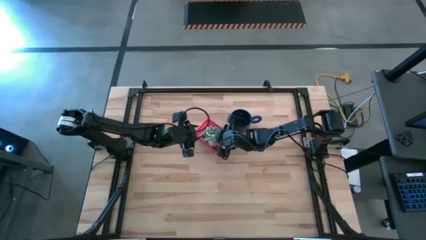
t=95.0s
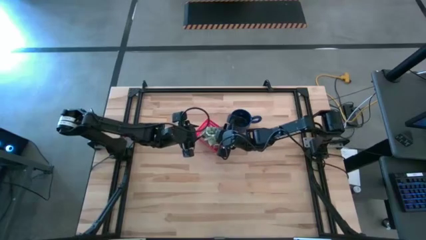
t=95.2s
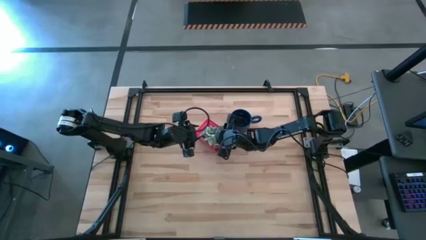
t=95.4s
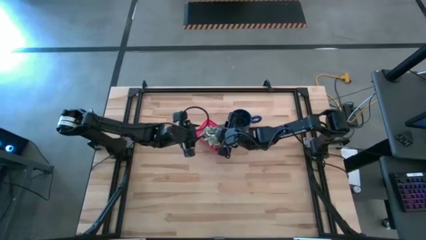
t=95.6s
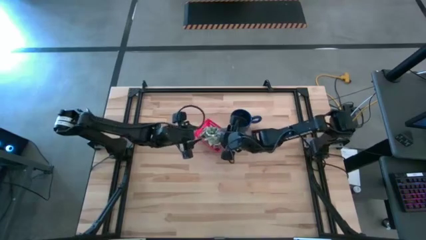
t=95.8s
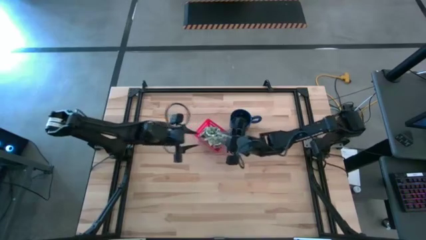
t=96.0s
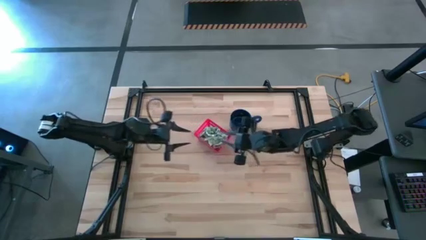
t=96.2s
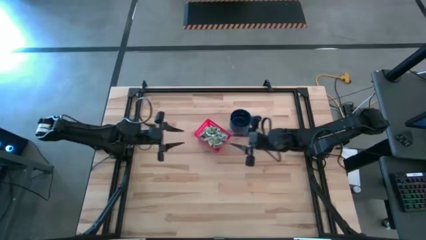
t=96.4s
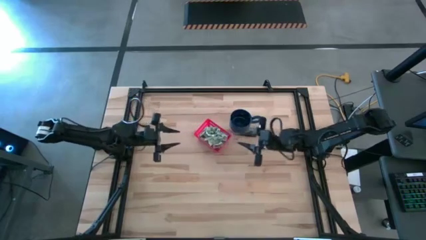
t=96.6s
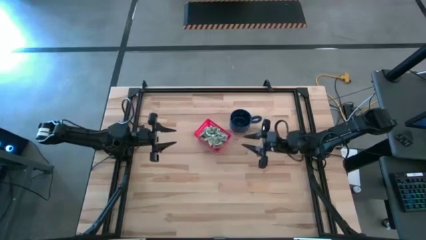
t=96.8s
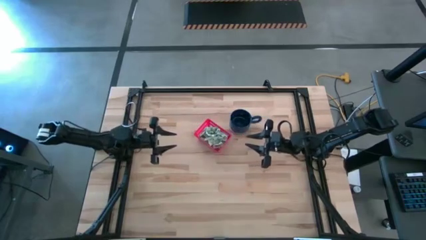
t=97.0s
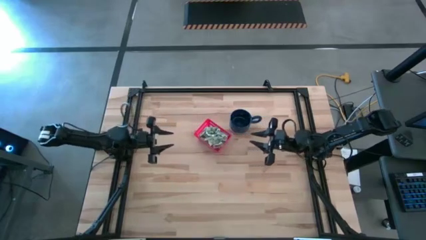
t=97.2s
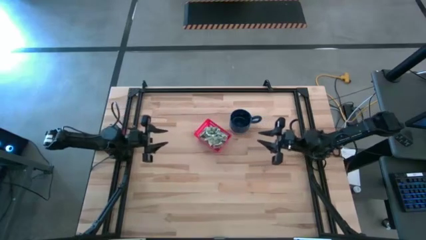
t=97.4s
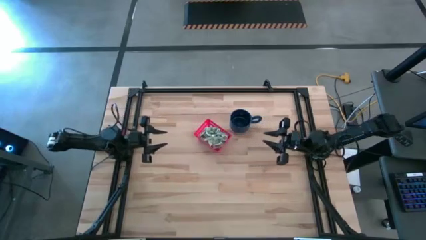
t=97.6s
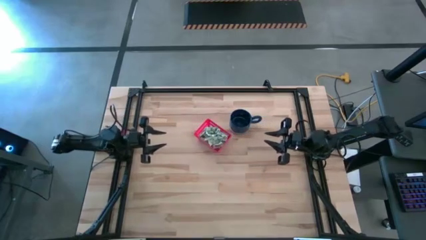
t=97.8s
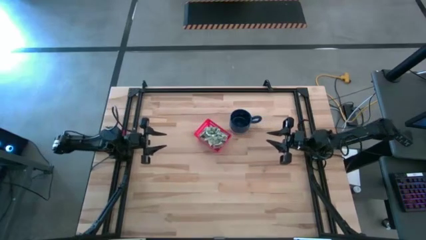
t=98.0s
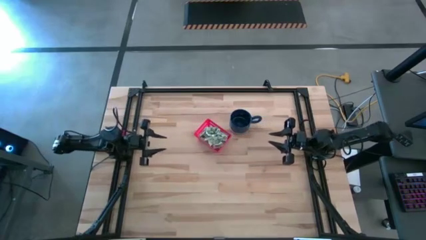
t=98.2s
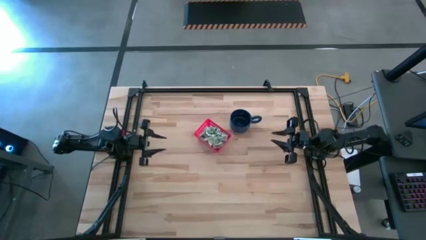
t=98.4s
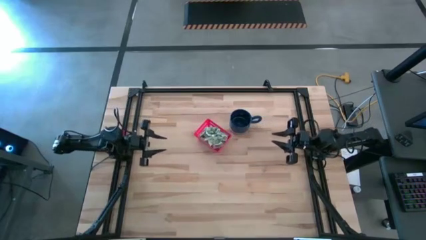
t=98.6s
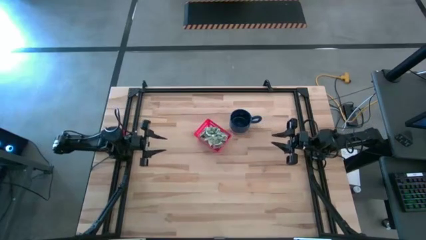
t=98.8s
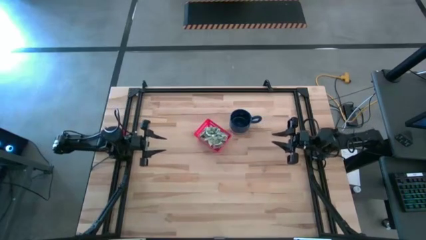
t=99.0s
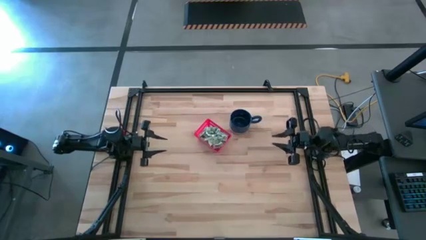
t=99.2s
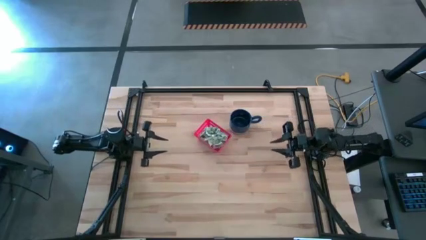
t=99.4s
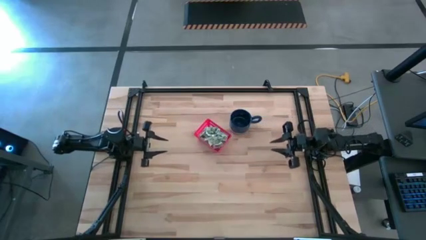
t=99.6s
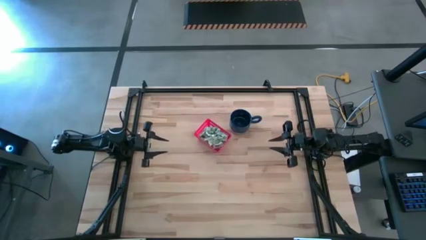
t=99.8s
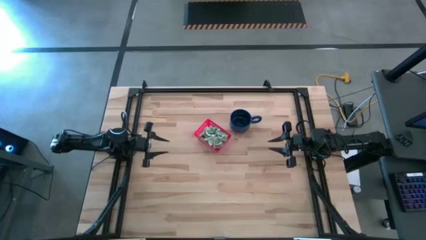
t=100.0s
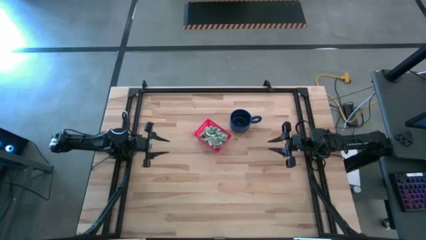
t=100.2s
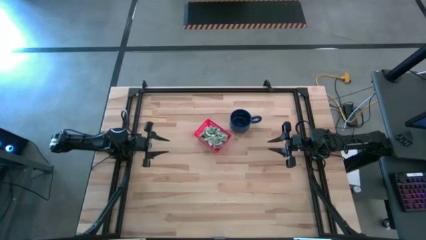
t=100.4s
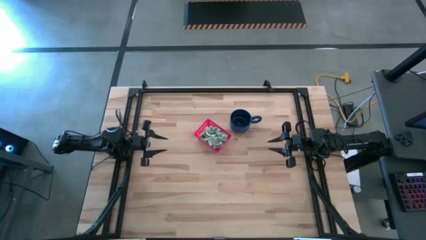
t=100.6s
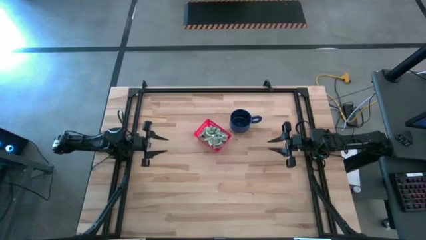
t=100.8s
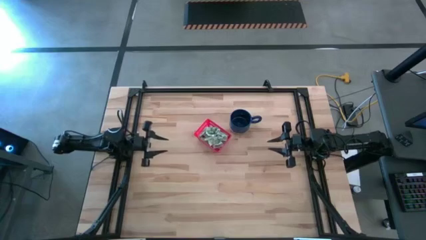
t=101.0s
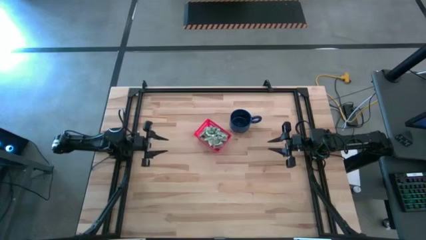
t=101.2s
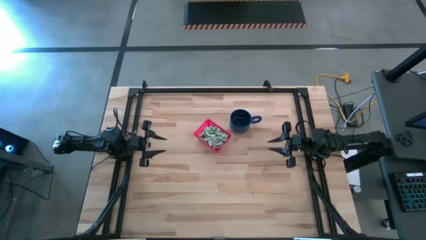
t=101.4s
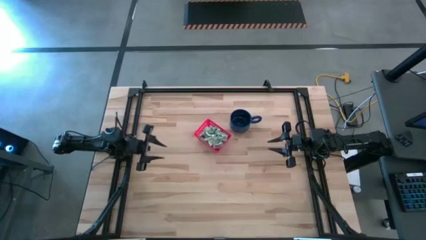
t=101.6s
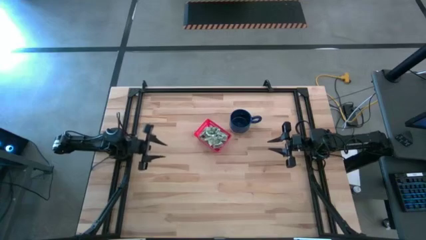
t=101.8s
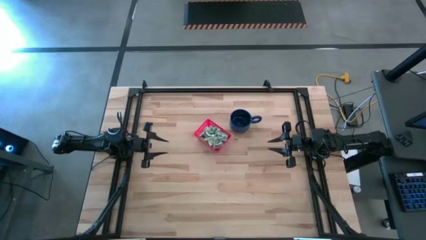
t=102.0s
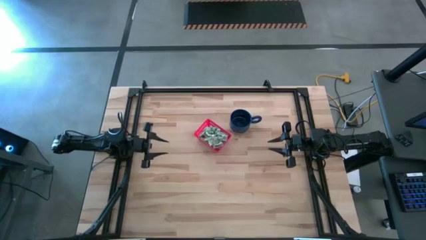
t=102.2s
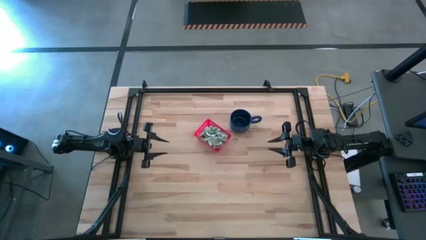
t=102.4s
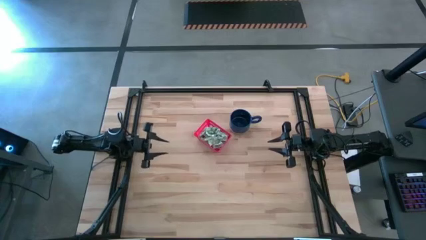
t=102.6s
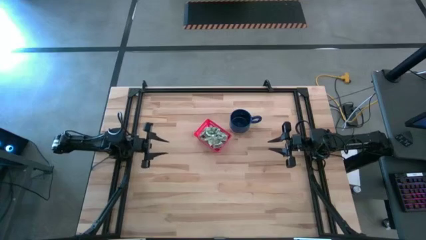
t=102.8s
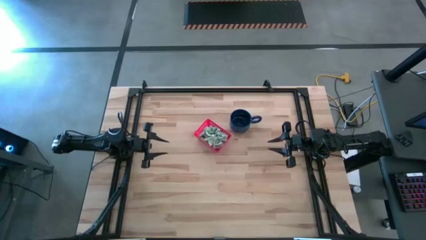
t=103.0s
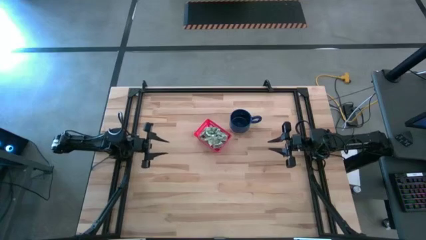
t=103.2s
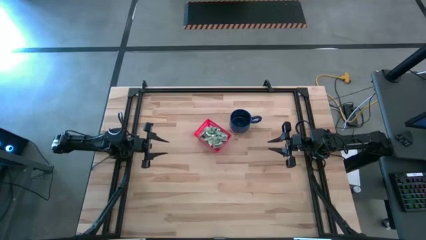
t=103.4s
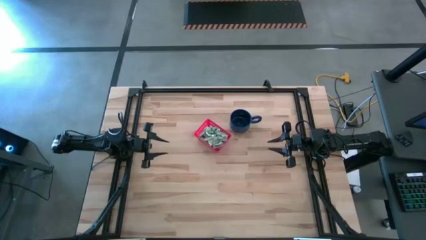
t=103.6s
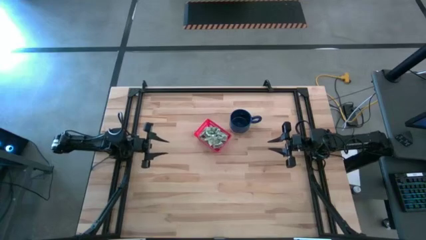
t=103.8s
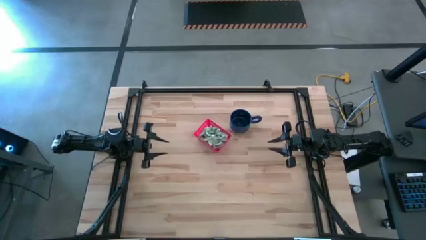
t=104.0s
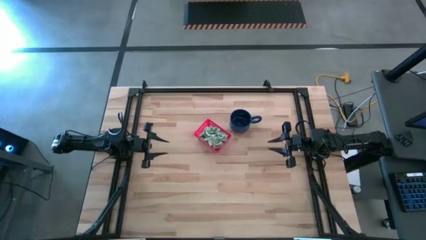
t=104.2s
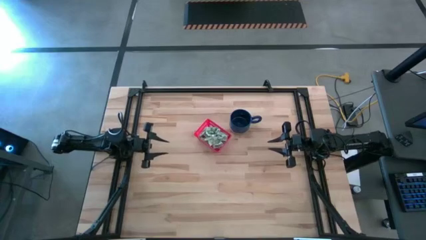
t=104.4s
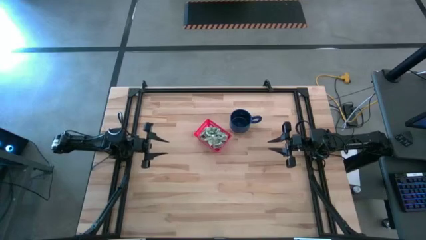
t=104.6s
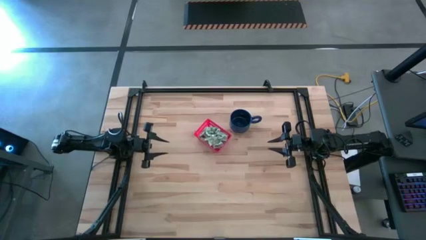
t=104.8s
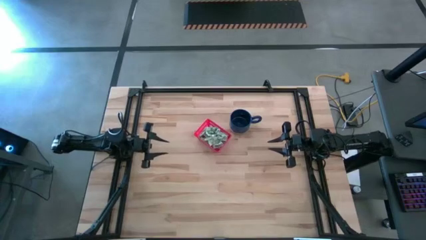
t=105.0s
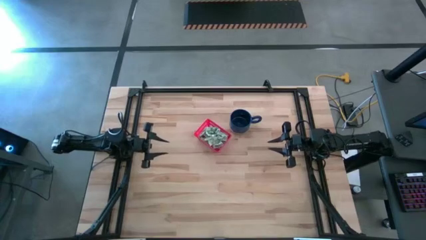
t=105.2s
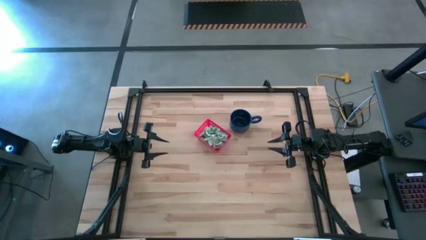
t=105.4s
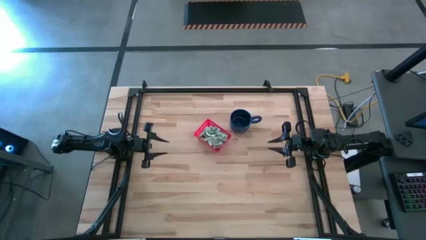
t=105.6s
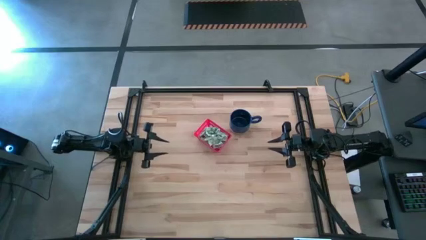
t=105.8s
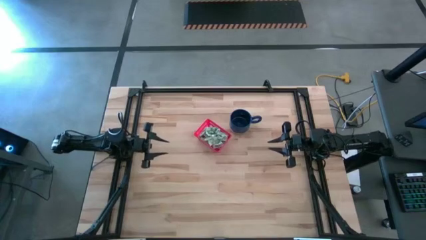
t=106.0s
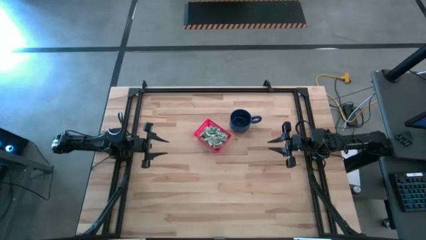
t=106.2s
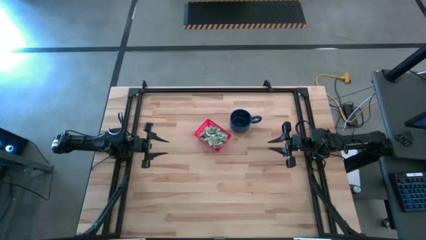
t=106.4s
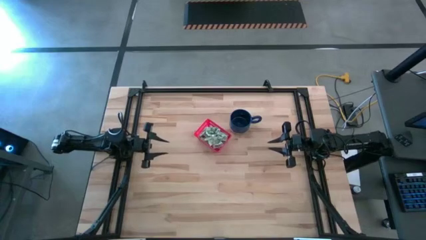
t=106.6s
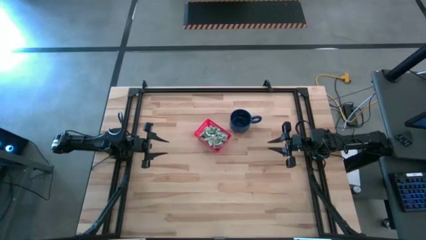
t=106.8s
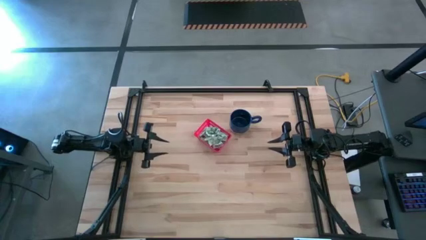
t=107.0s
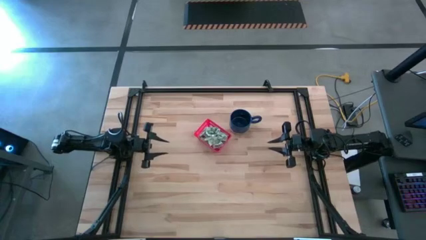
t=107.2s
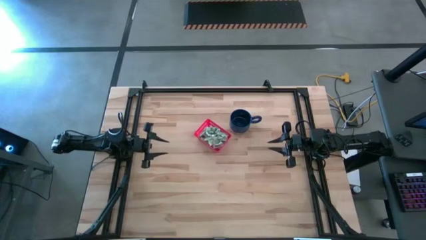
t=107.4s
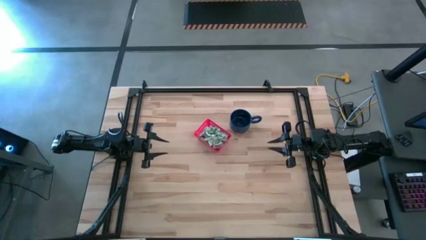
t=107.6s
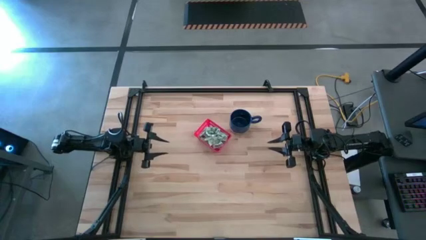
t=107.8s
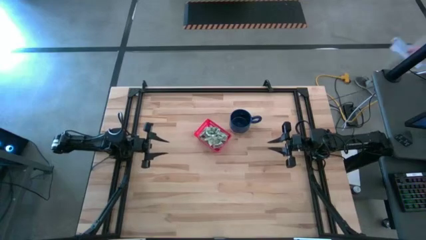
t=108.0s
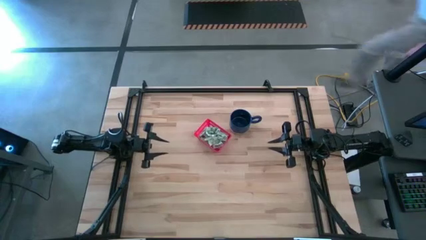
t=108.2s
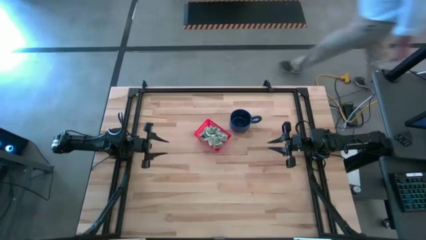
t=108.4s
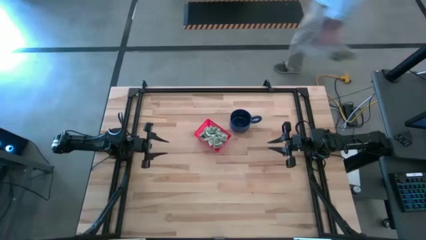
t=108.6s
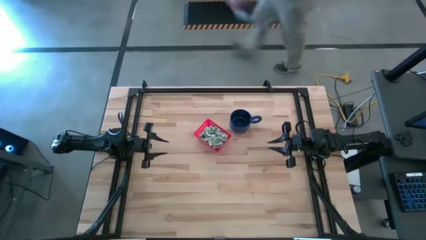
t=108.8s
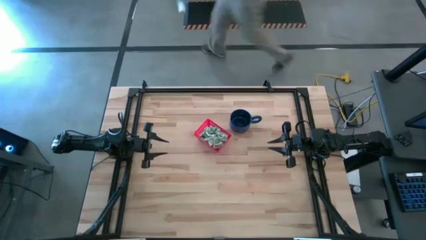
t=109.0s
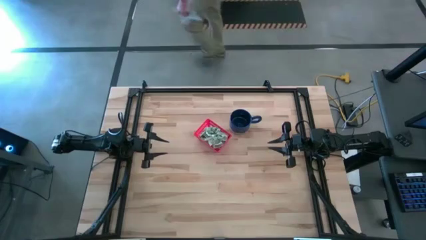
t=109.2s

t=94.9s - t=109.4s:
Task: Pick and place items into bin
Return to Home Position
